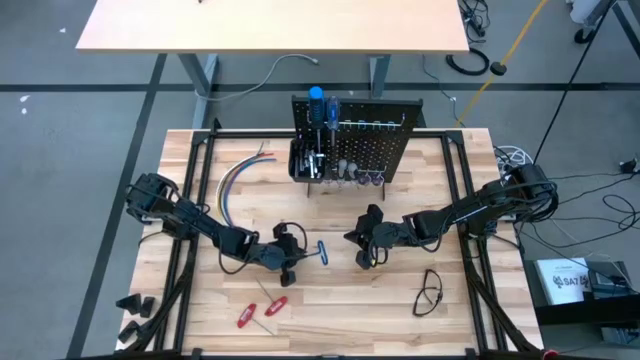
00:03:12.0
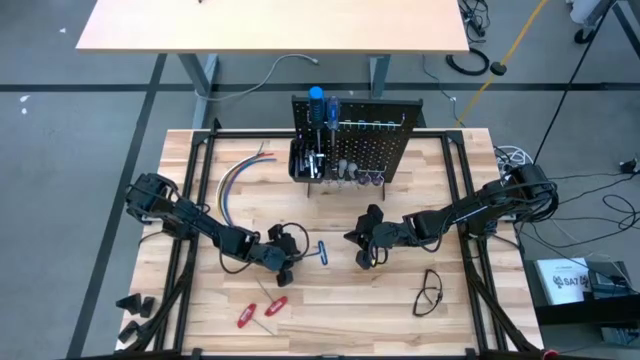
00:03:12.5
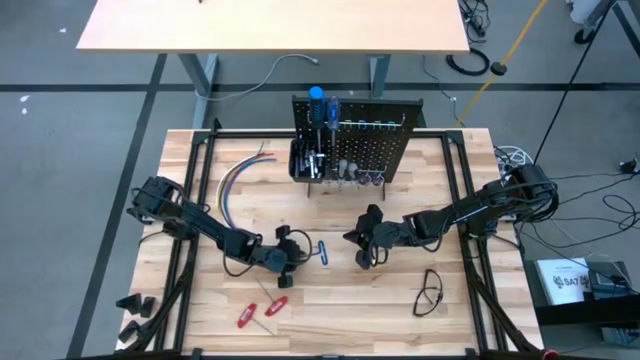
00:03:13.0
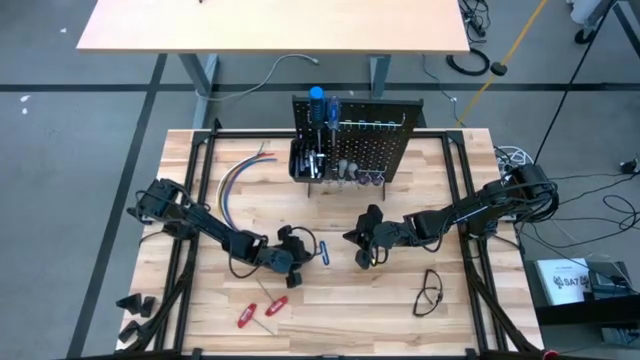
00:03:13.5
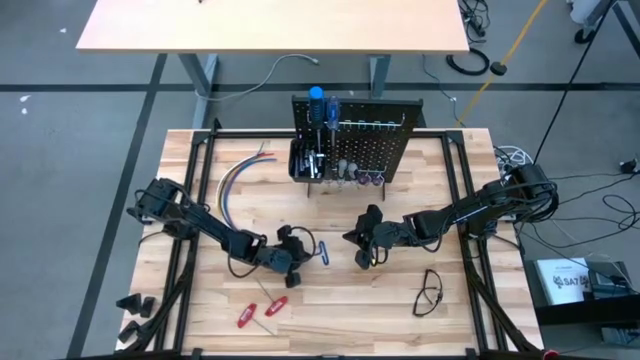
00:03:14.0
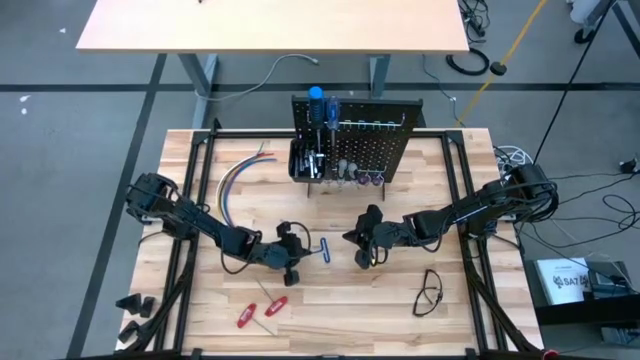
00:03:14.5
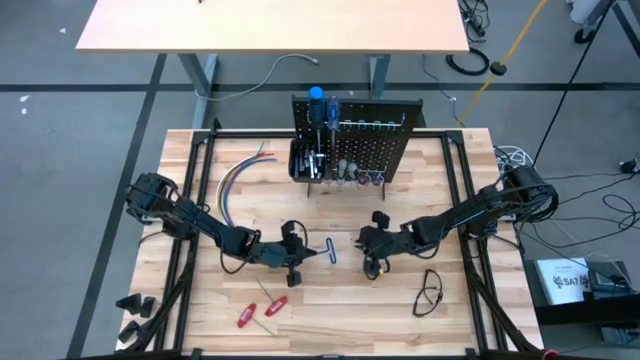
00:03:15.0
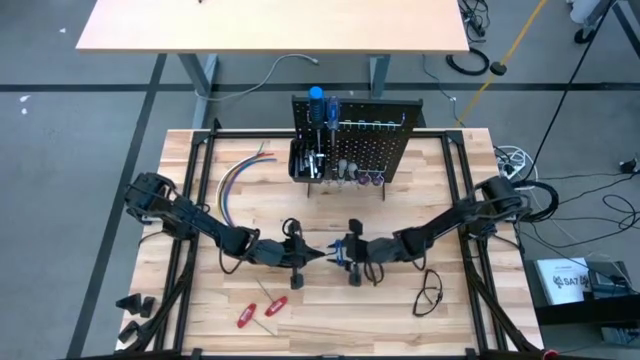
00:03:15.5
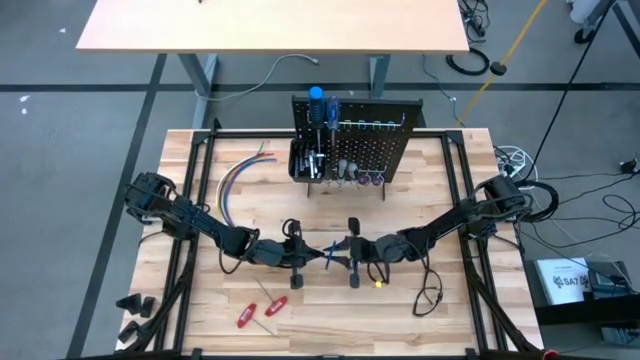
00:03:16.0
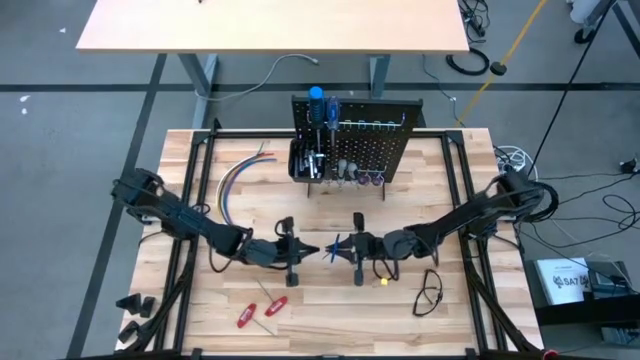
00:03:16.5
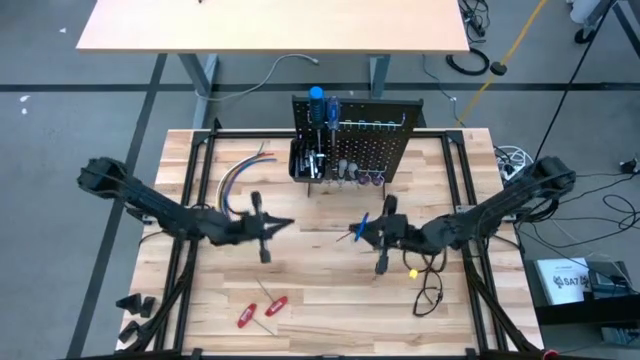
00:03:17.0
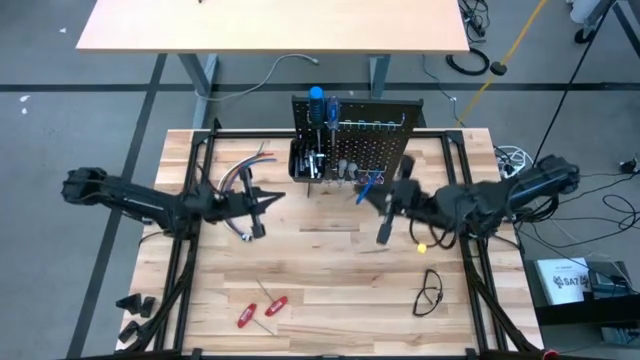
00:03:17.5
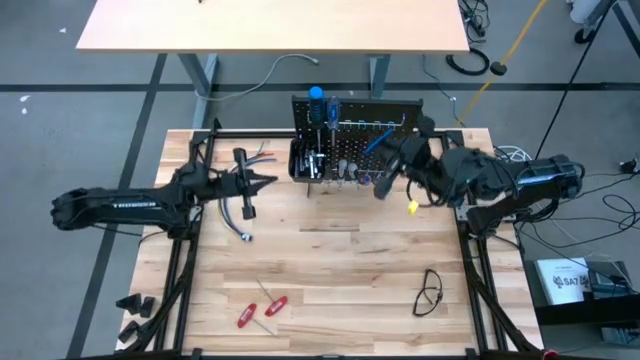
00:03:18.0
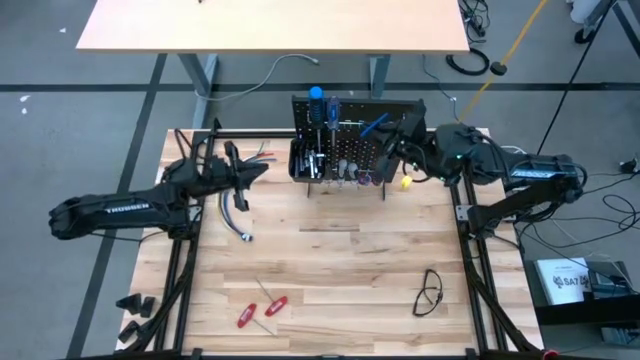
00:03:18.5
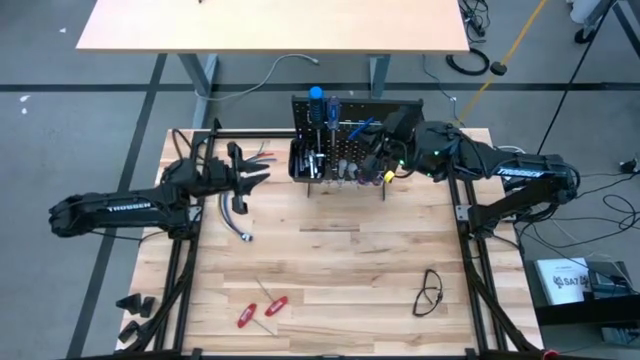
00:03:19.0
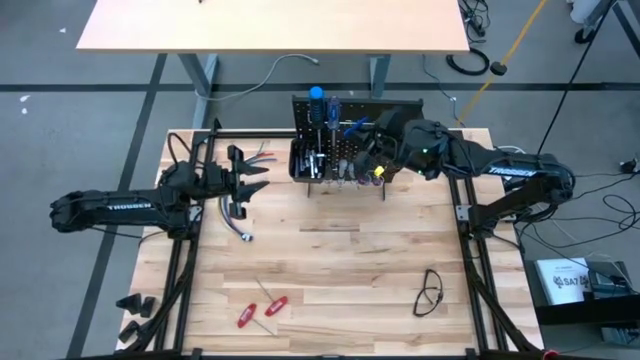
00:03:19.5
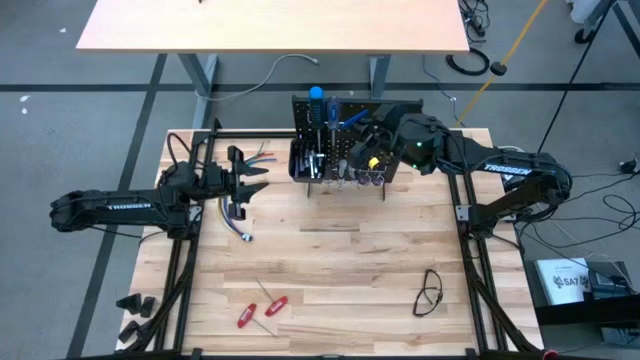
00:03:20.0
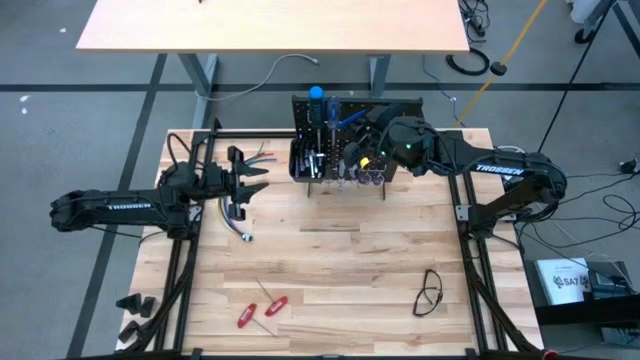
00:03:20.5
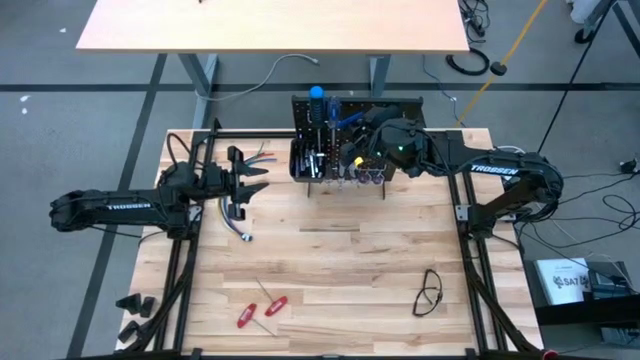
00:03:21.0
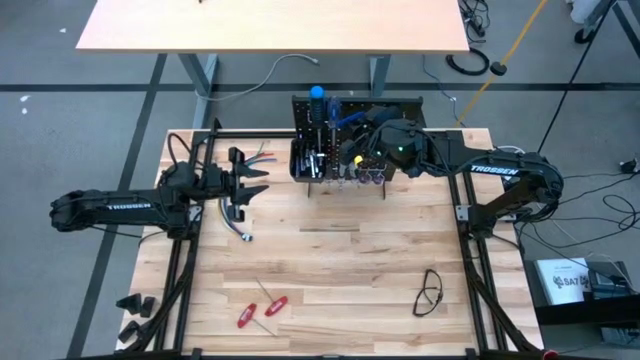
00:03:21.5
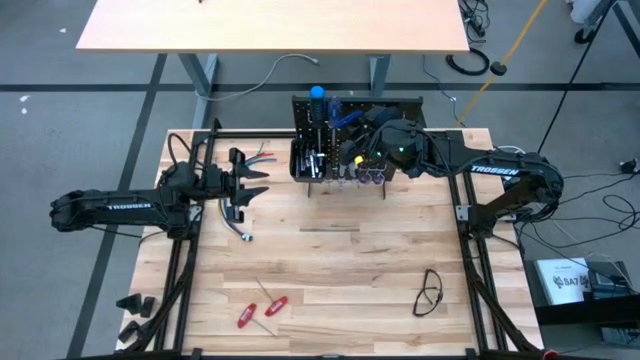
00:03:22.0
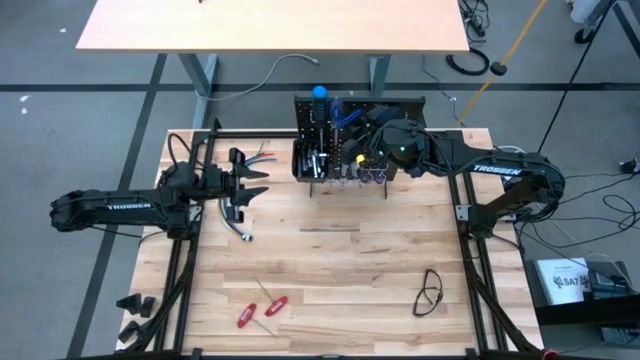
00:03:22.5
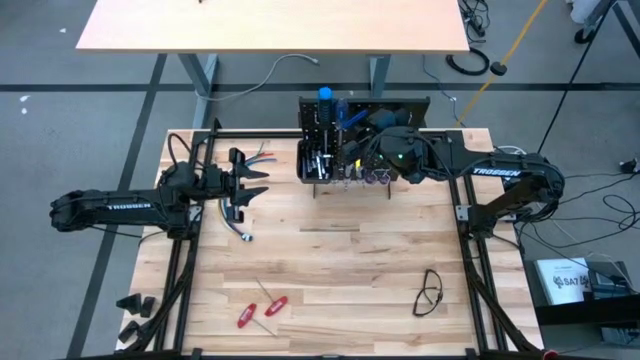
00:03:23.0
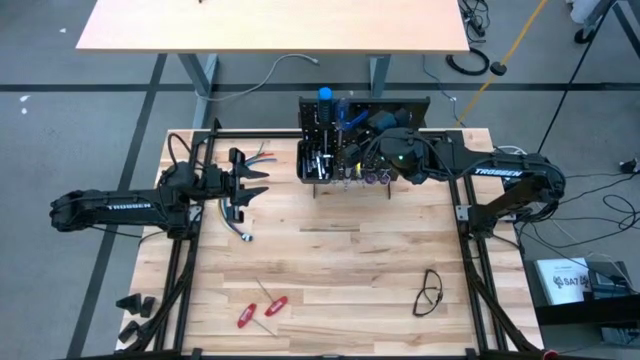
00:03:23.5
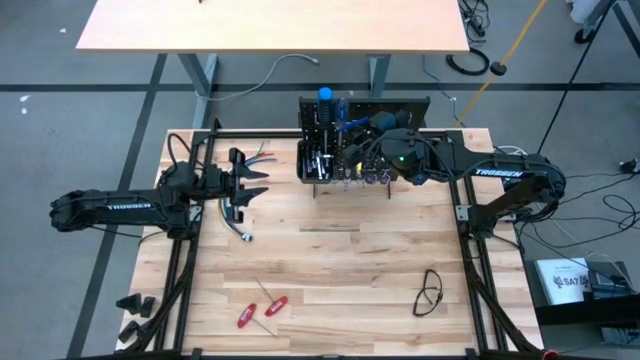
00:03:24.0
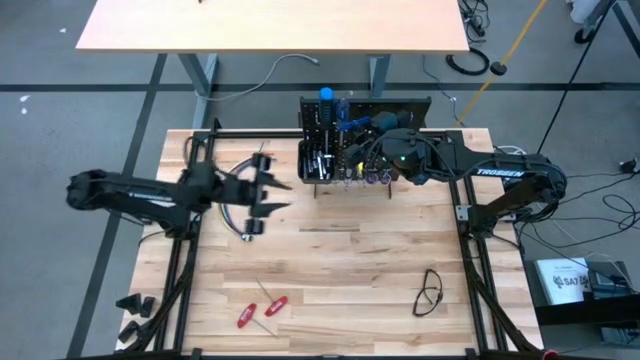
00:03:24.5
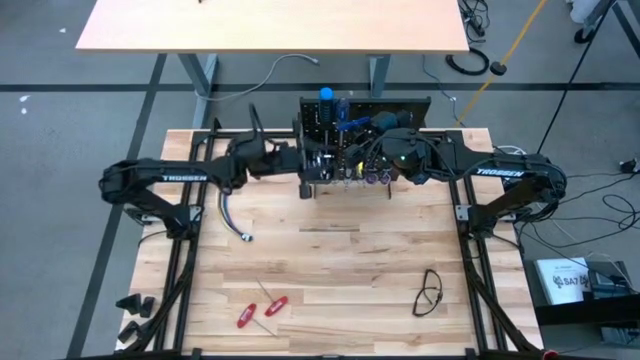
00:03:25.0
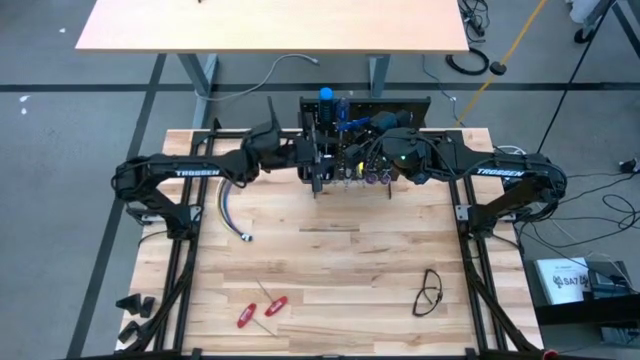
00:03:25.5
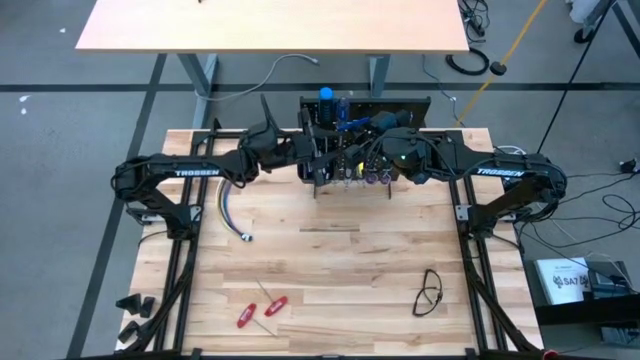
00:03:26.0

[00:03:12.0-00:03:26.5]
Task: Hang tools onto peg board
Hang the blue pick tool on the peg board

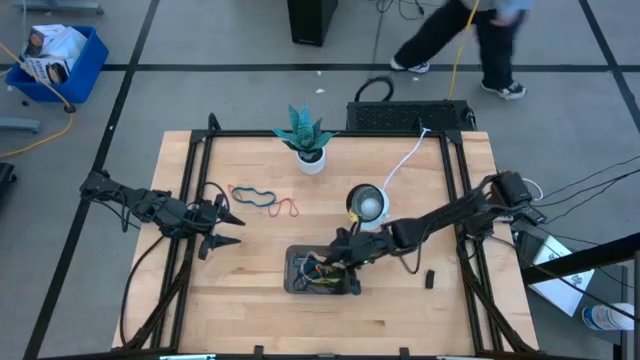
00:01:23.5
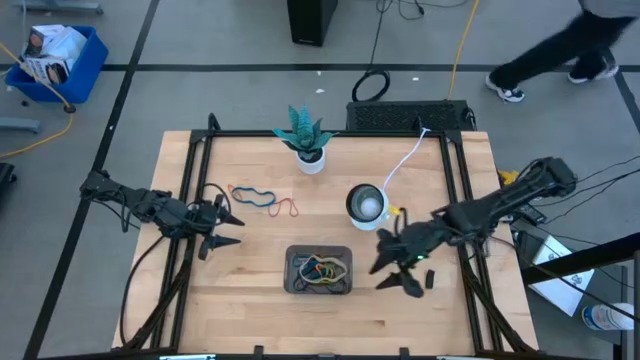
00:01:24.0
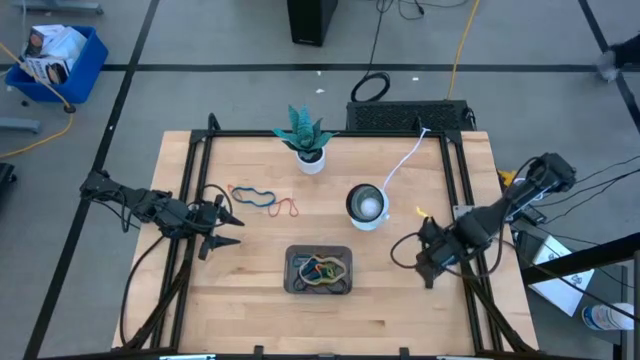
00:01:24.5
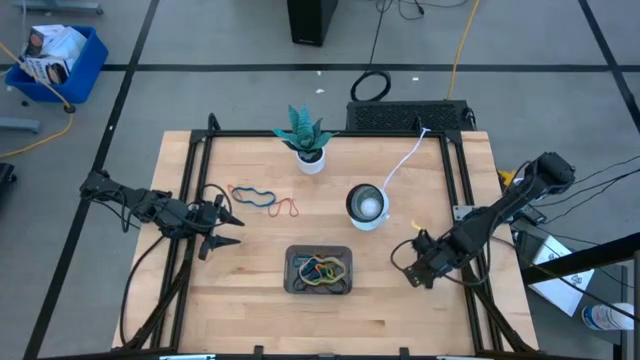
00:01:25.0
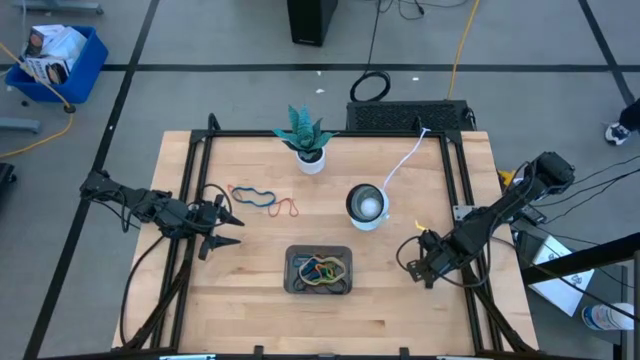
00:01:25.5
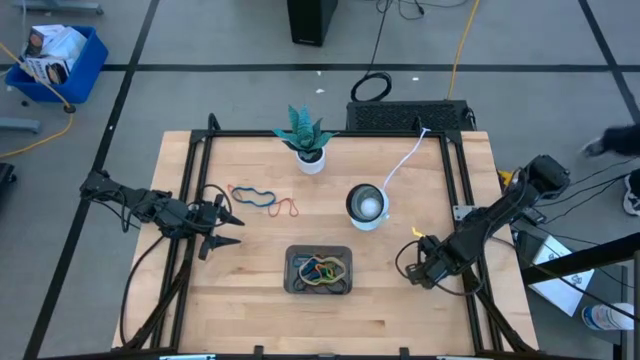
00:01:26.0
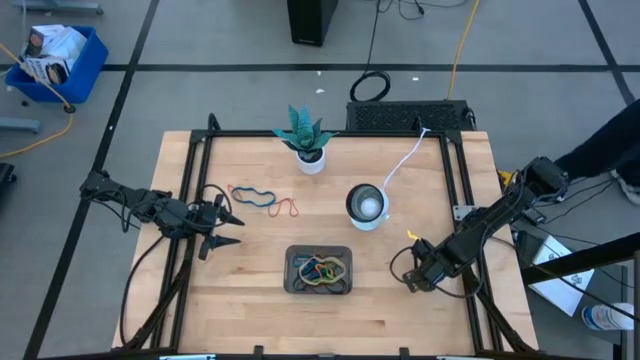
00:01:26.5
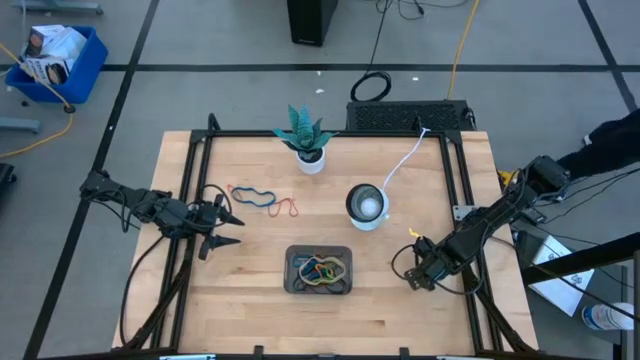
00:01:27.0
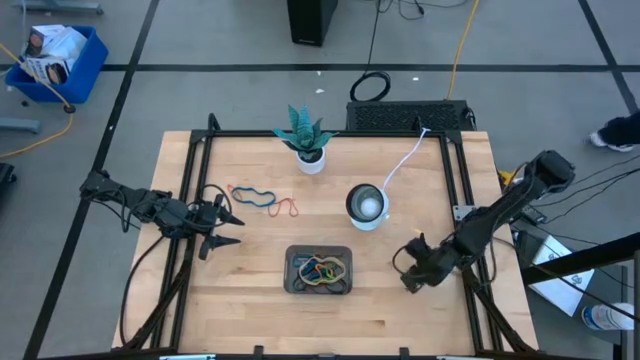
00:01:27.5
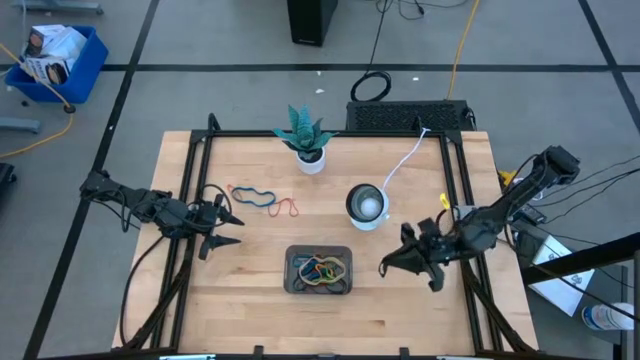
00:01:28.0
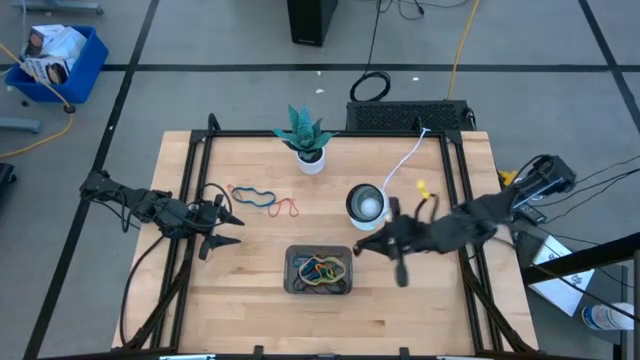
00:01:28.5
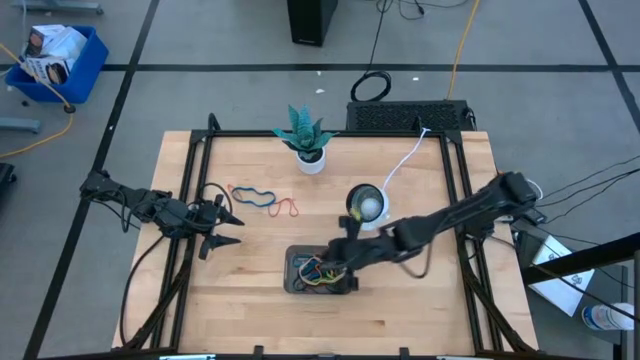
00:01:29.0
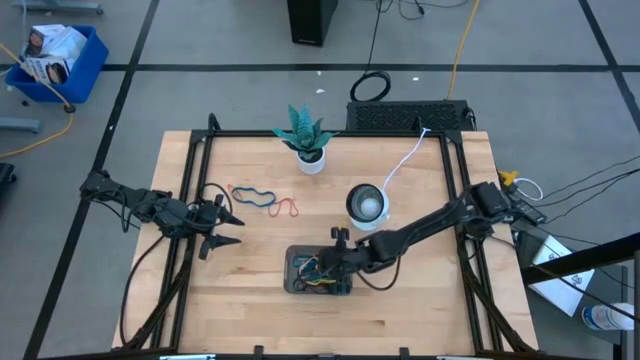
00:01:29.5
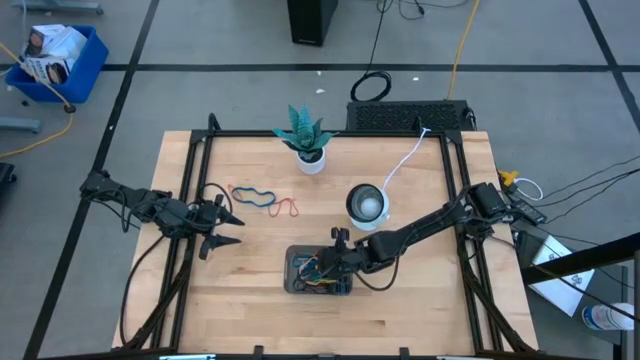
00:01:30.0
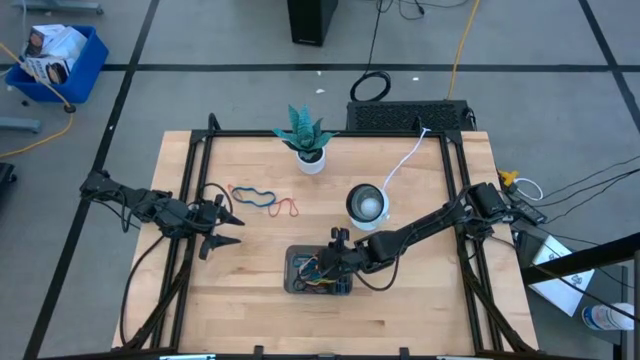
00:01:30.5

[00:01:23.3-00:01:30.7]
Task: Pick and place rubber bands into bin
Put the black rubber band into the gray bin
